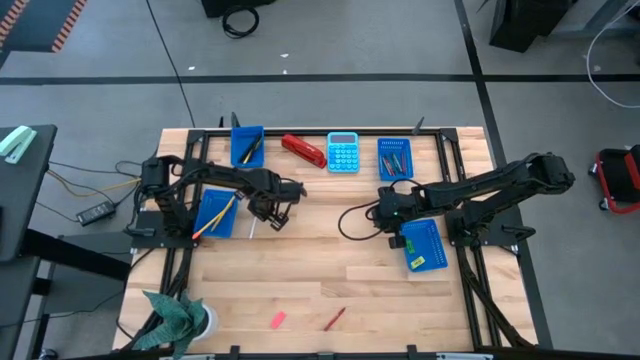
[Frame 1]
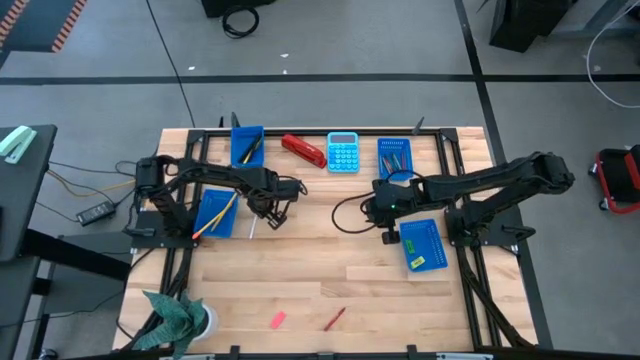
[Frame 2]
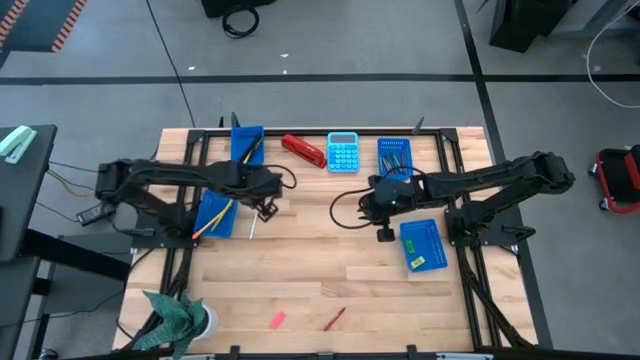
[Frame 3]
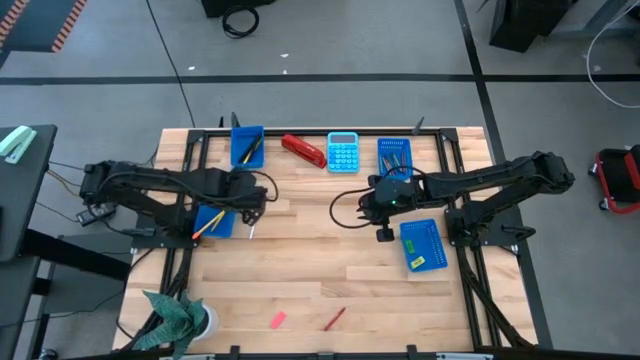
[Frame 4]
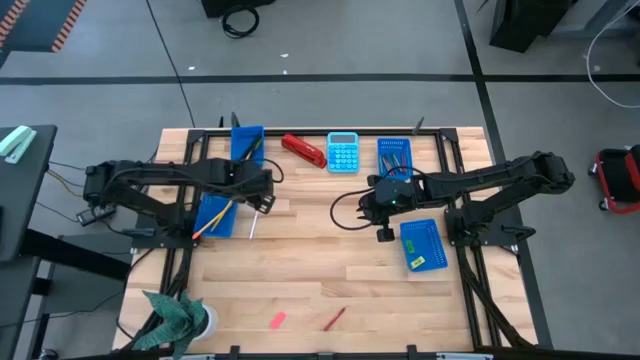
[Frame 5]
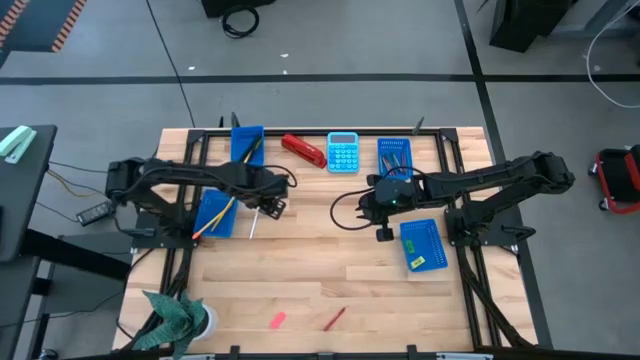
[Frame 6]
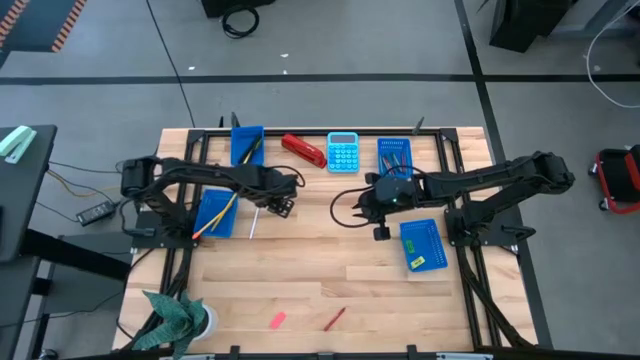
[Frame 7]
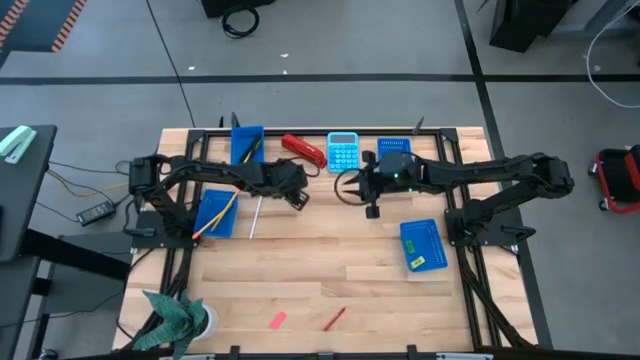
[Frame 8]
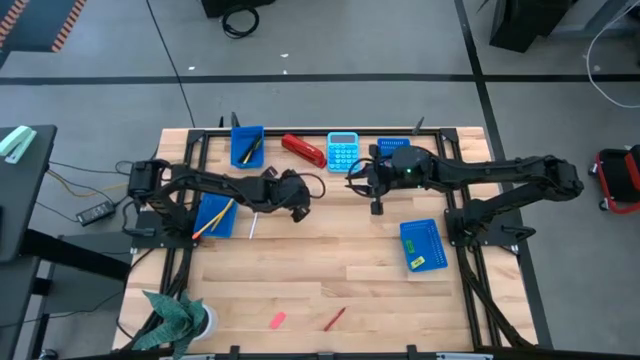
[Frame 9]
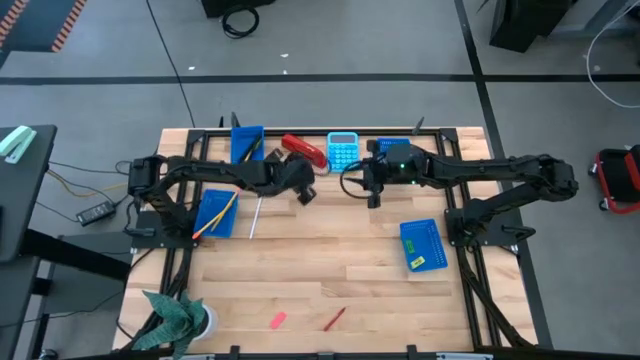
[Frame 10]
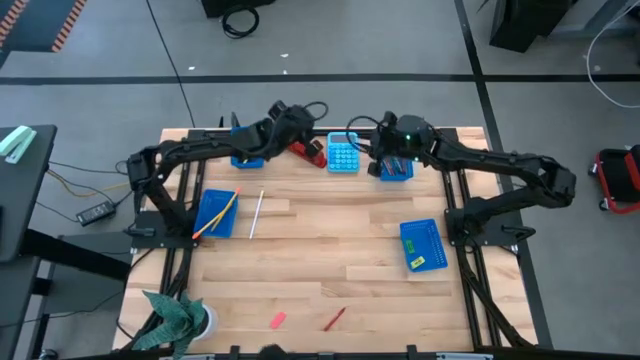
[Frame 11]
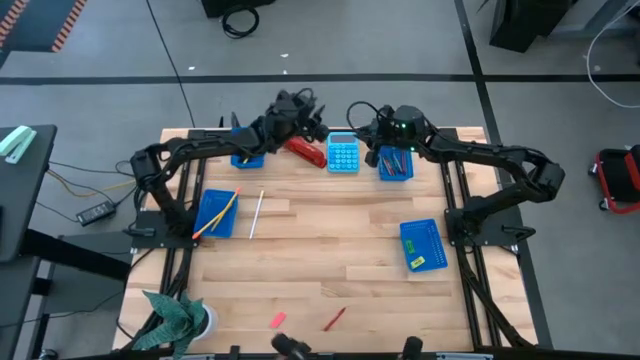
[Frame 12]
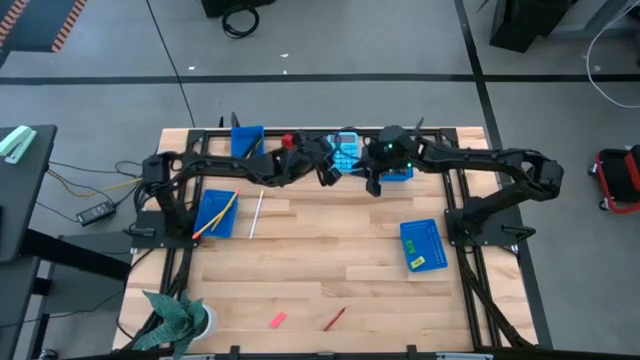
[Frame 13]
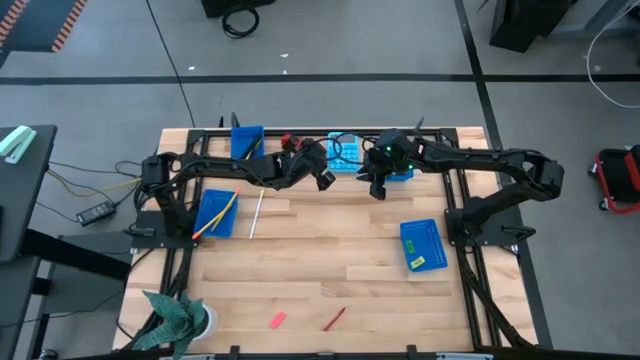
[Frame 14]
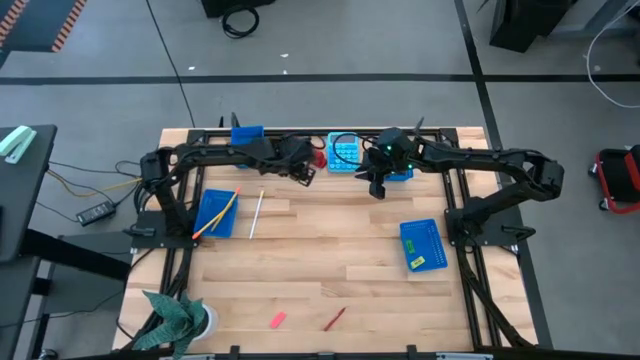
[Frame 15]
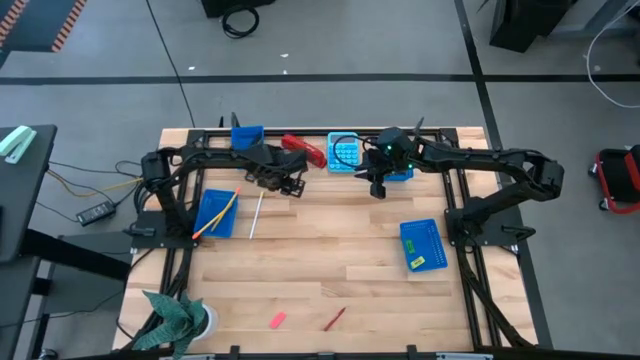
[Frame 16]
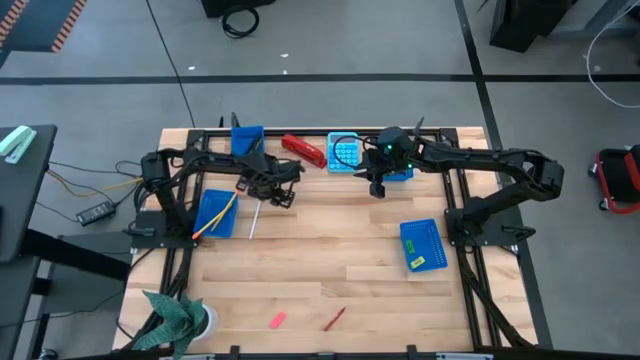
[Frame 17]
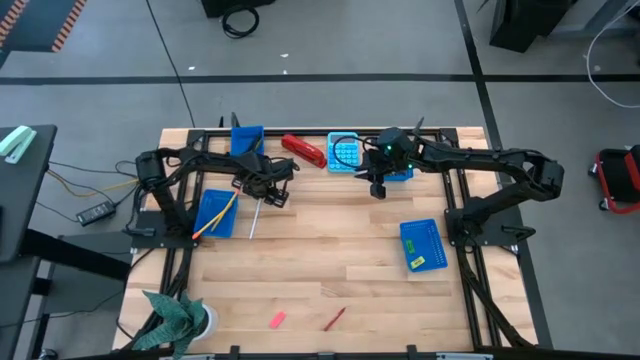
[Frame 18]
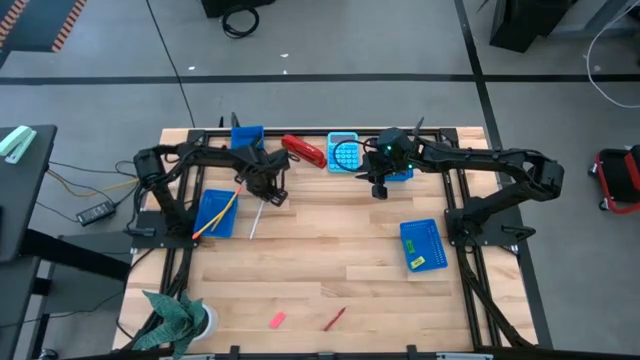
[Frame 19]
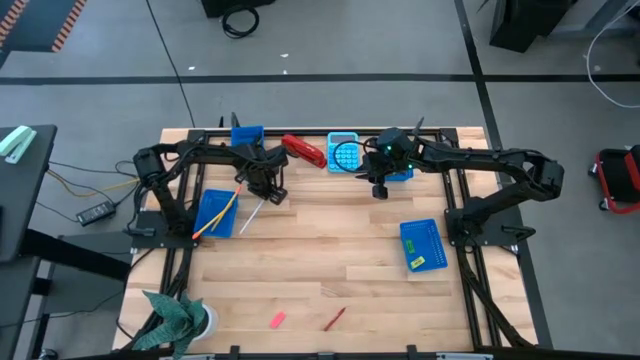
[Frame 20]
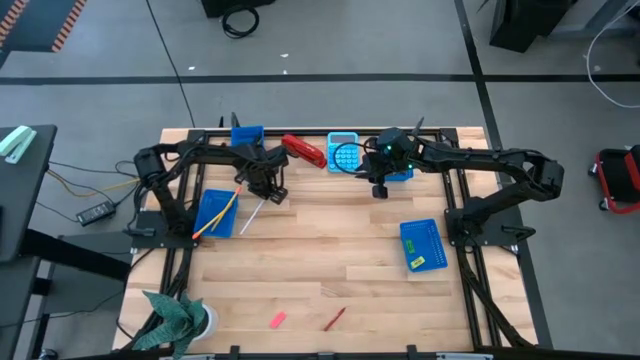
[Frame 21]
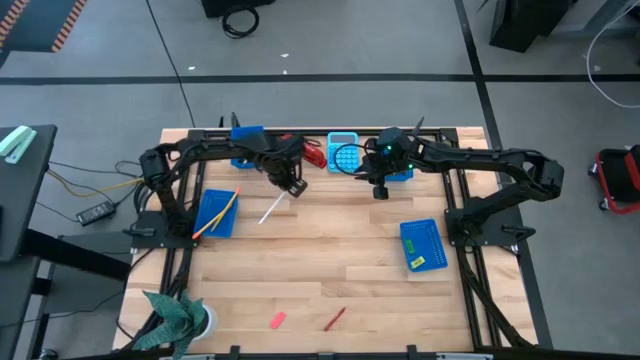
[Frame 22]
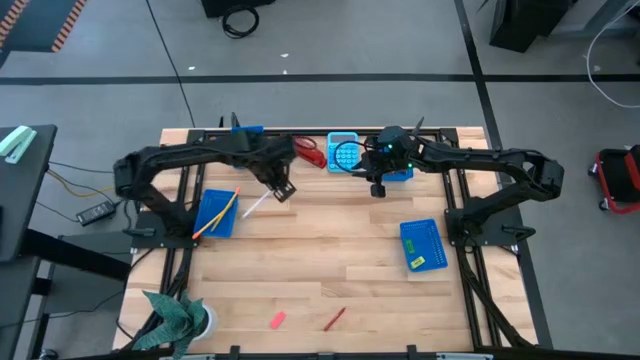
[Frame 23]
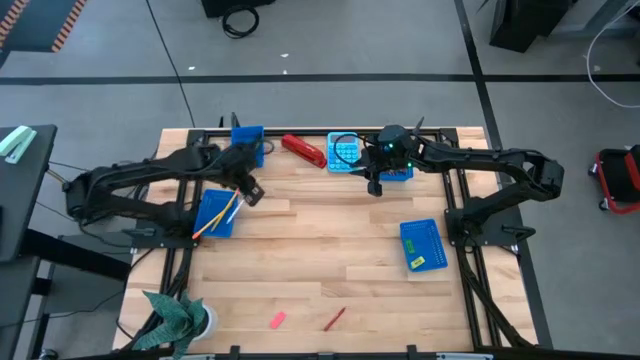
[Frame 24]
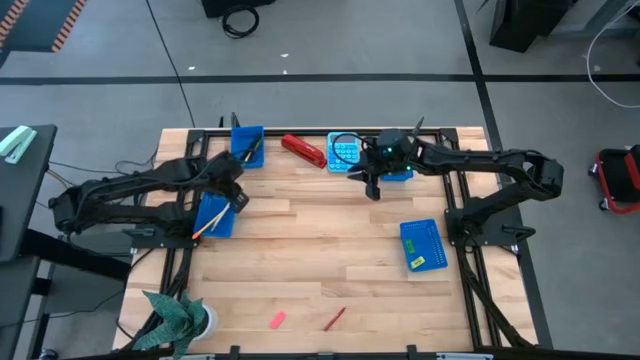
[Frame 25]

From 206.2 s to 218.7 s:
Task: Sort crayons/erasers/pens/pencils in bins
Put the white colored pencil into the middle left bin

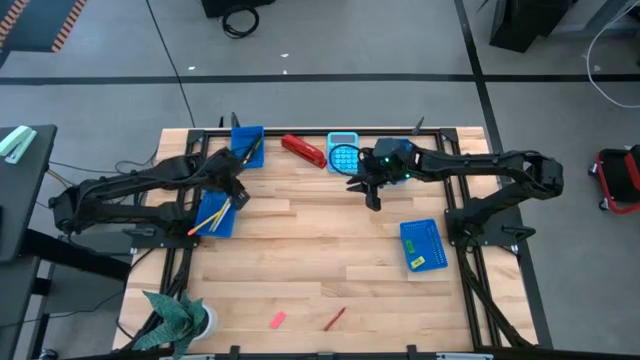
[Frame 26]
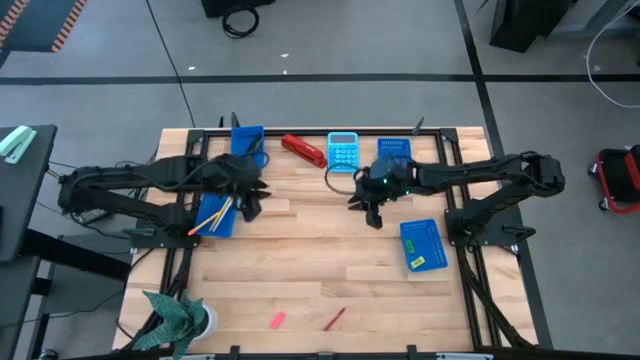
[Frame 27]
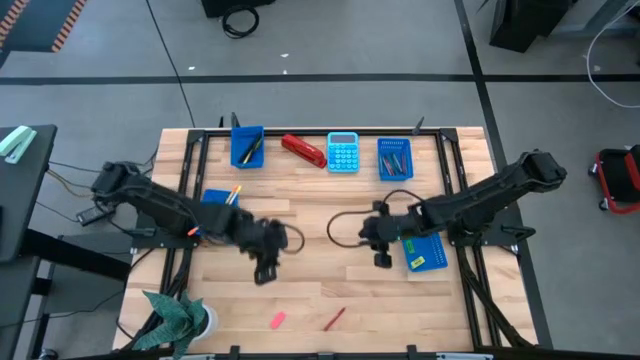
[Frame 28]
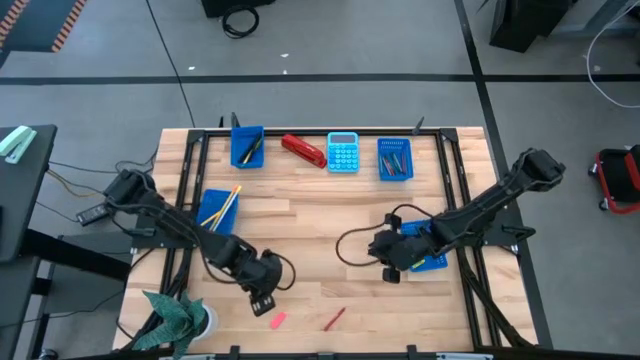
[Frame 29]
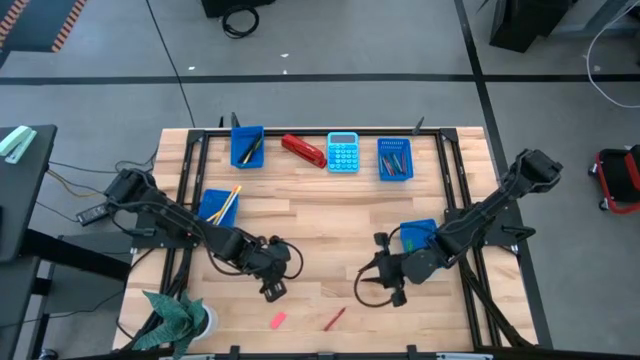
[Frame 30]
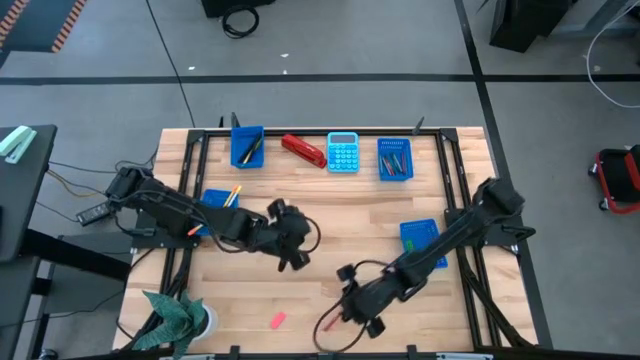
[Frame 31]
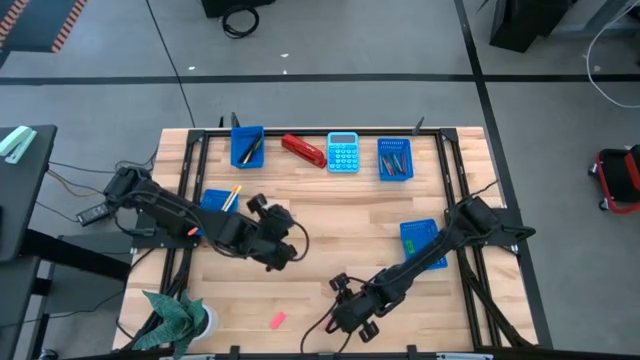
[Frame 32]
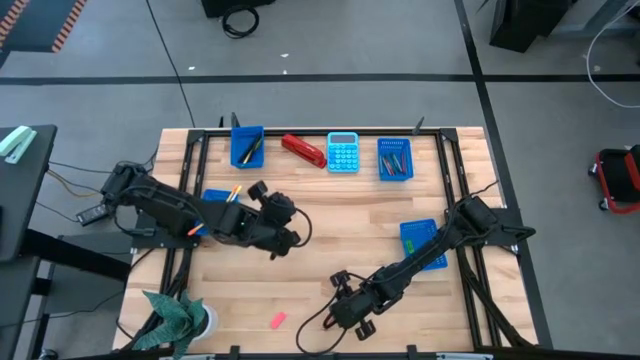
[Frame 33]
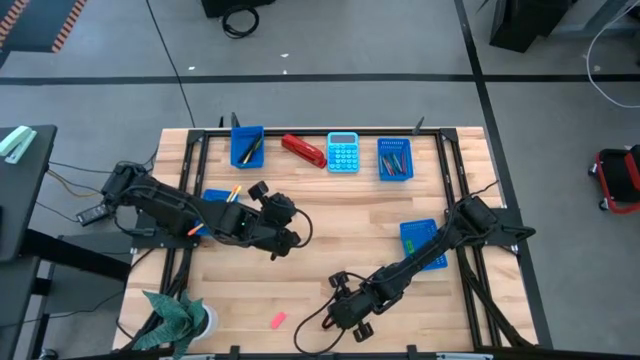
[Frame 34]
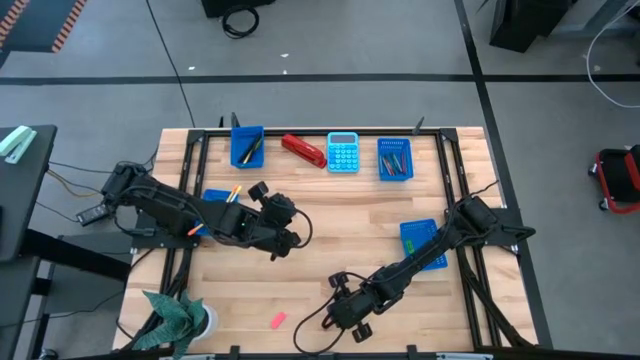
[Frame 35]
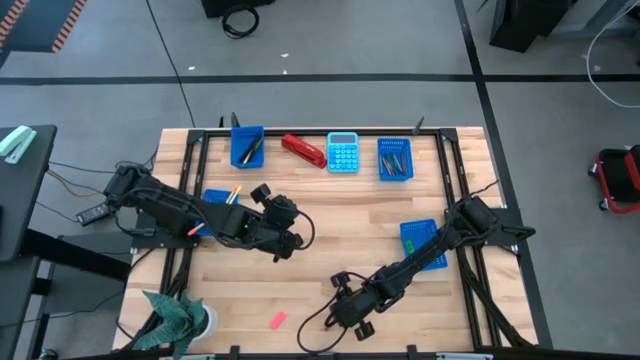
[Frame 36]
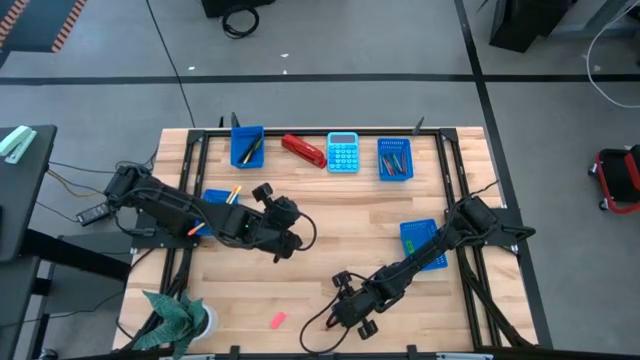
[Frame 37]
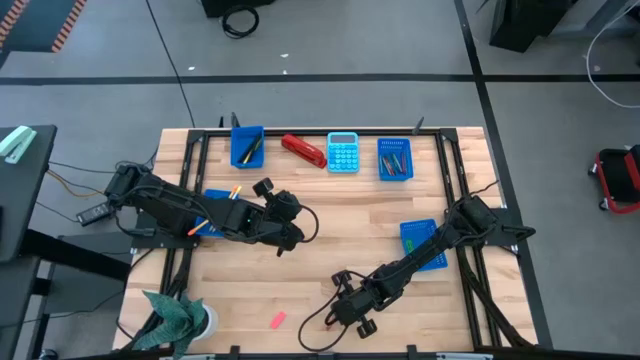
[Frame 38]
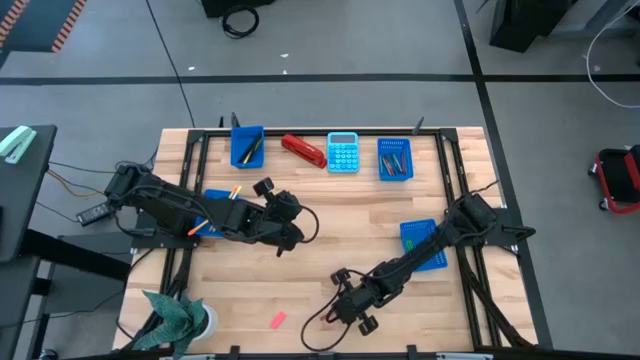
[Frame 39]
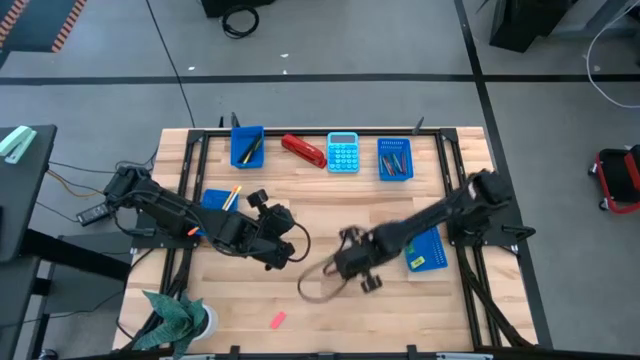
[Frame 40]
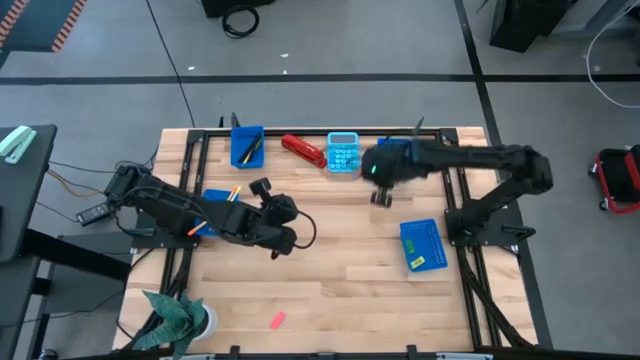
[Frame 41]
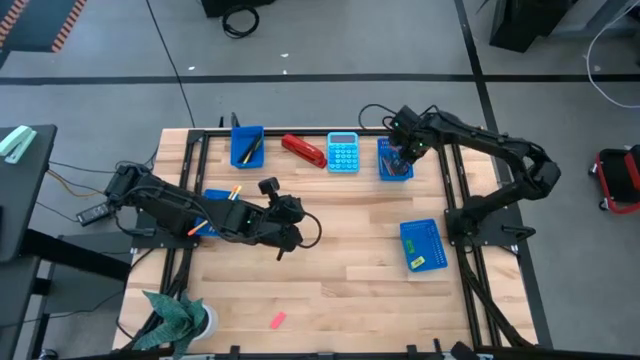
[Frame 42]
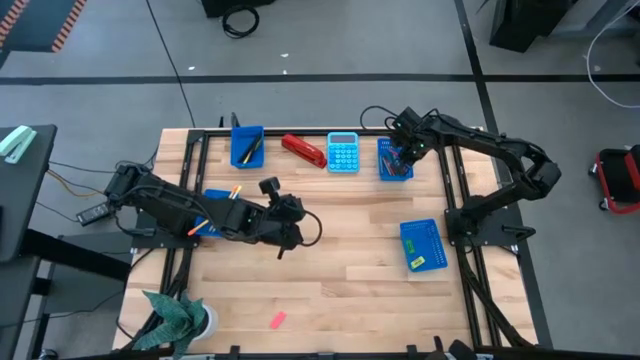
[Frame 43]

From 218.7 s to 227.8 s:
Put the red crayon into the top right bin
